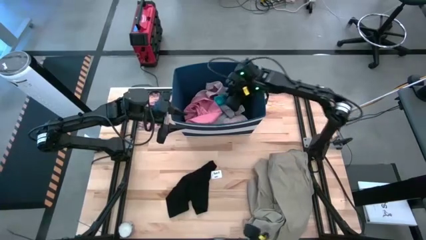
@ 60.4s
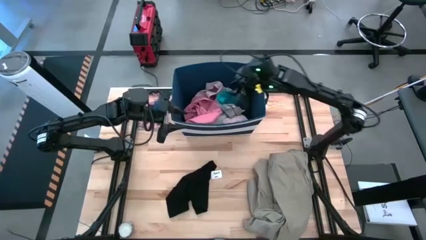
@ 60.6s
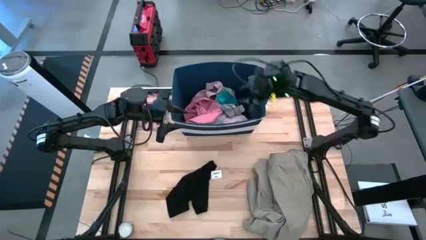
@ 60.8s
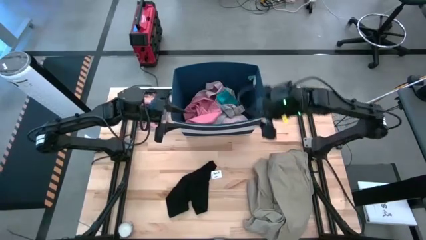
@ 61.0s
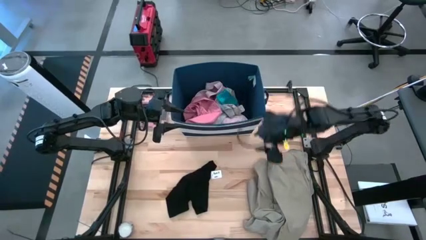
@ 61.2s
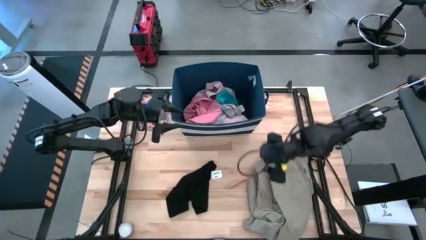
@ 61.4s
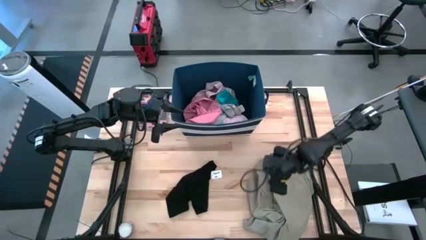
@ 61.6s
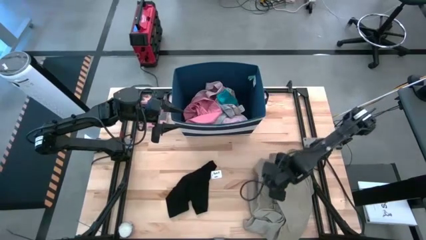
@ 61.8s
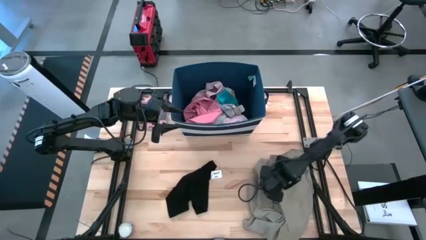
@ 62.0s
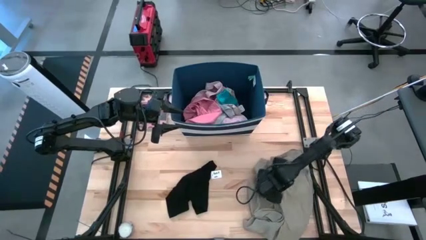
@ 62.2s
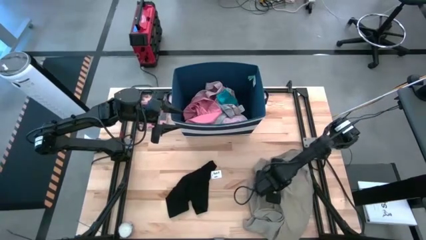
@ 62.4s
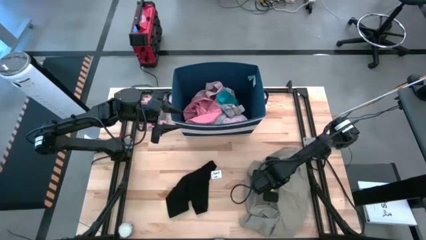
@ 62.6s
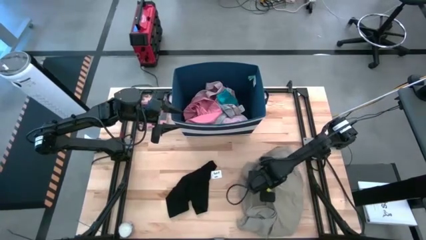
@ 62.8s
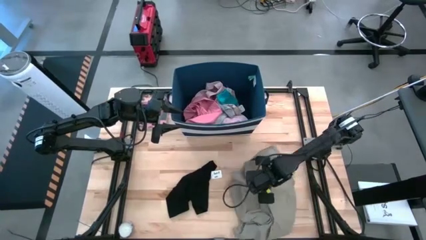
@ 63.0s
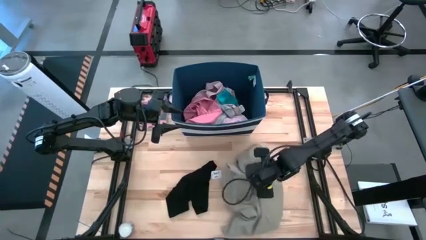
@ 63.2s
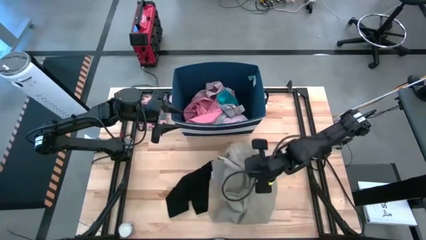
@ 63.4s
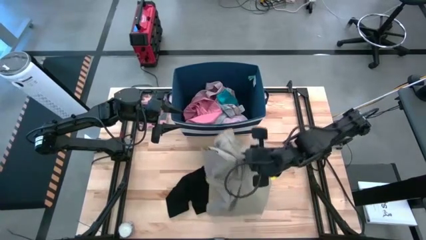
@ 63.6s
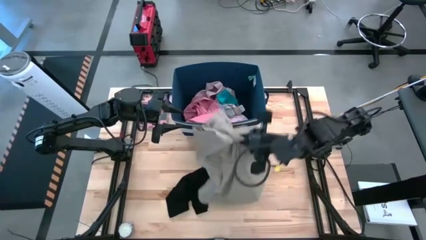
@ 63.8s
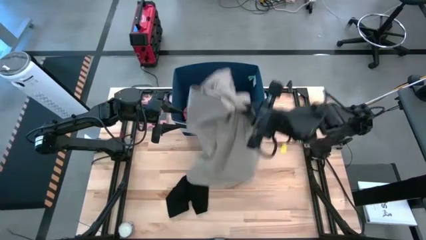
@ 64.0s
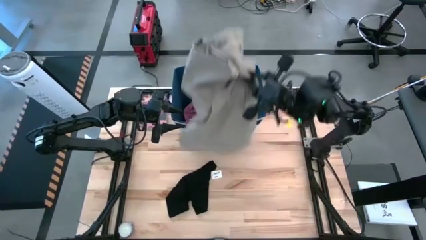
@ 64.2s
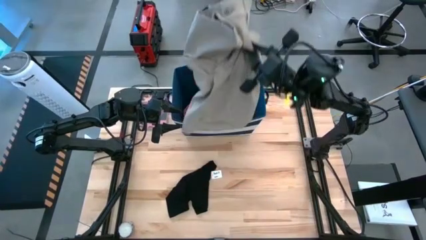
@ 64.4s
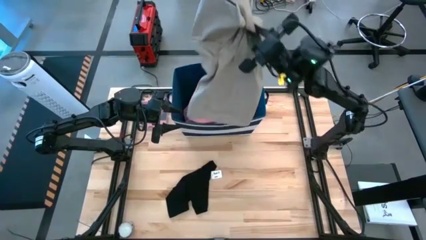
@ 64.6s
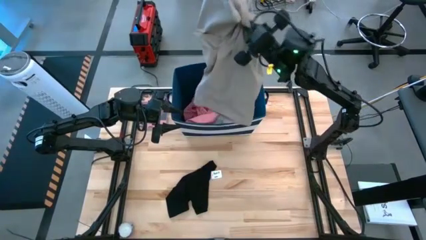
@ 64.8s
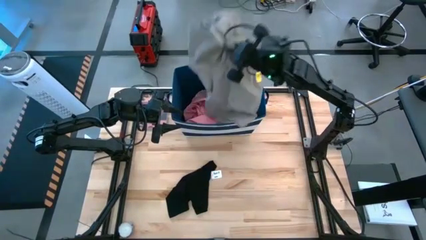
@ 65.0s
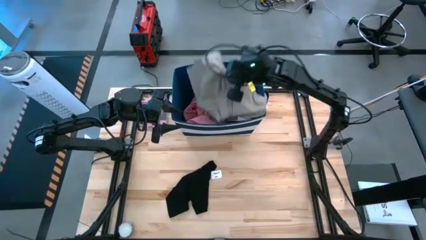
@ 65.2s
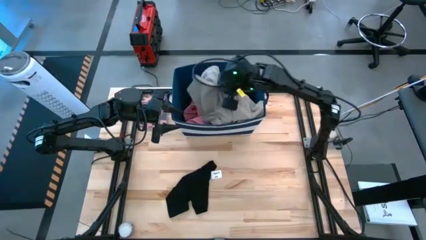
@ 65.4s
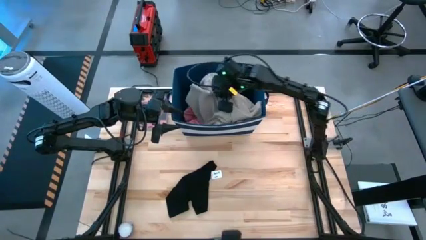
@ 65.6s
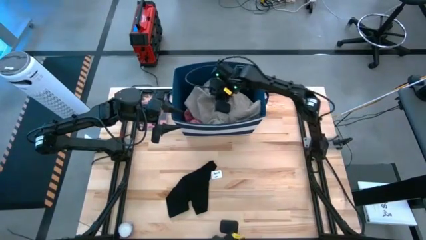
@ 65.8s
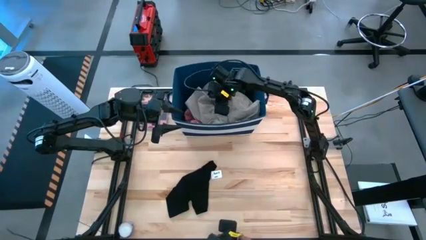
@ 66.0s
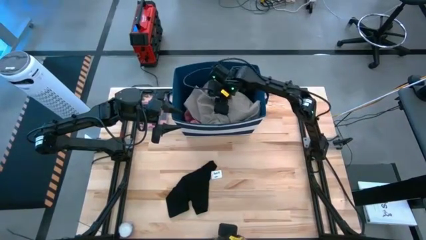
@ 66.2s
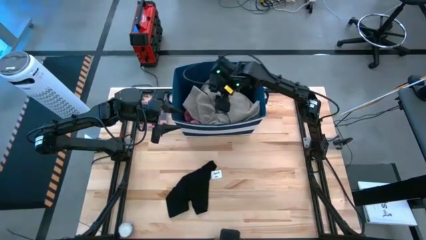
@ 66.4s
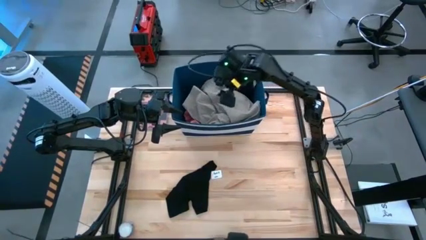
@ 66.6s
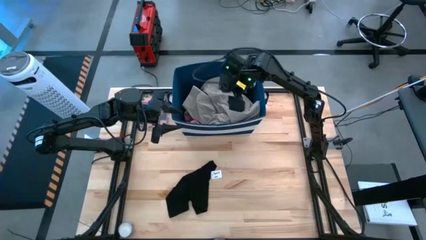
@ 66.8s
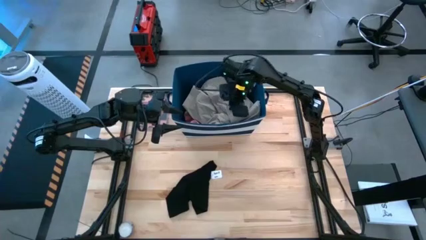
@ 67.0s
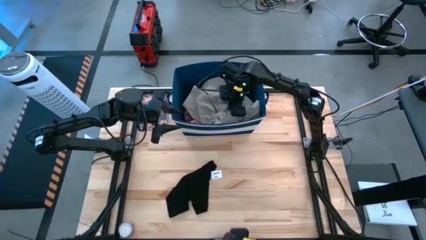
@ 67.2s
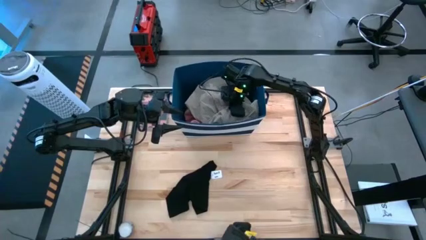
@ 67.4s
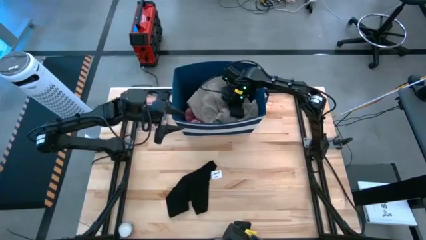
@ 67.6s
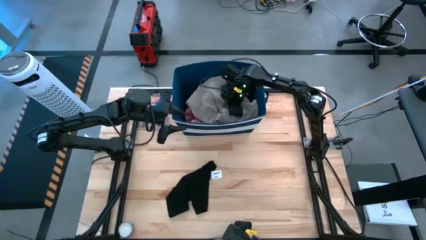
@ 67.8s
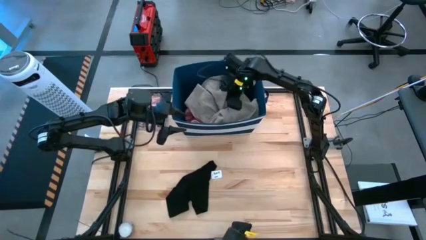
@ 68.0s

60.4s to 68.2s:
Task: Sort clothes
Put the gray shorts into the blue bin

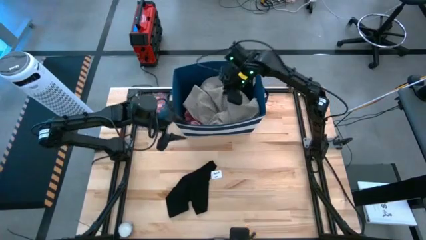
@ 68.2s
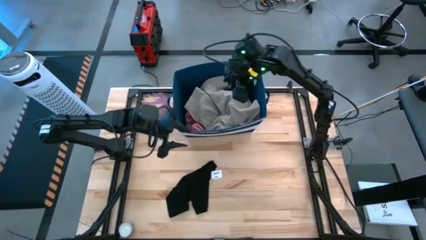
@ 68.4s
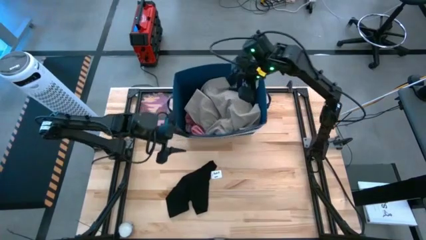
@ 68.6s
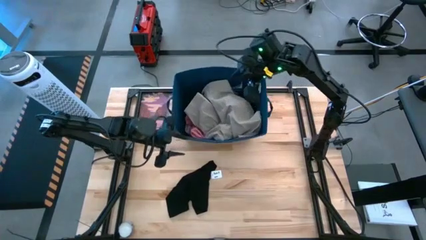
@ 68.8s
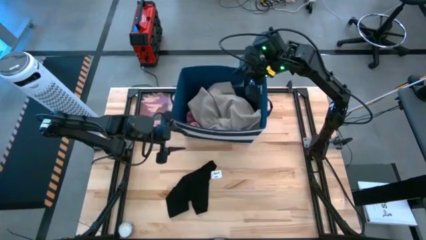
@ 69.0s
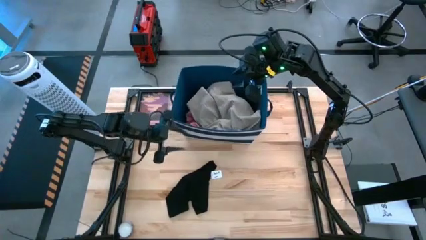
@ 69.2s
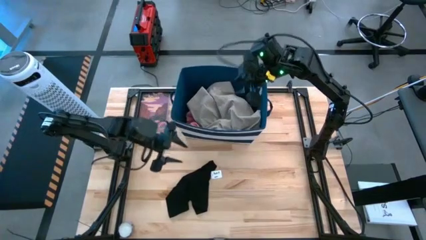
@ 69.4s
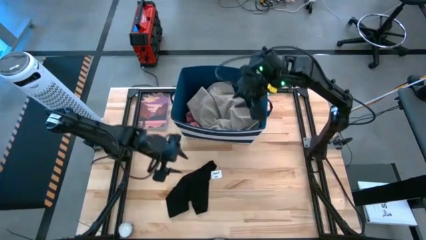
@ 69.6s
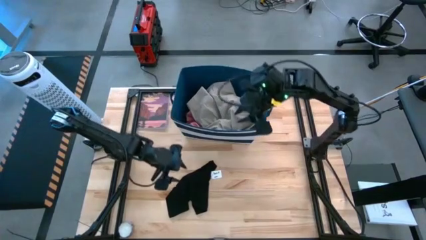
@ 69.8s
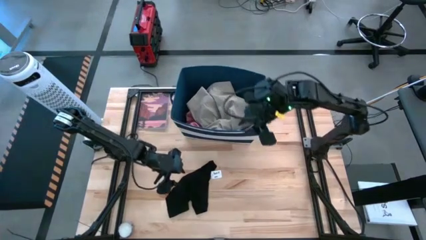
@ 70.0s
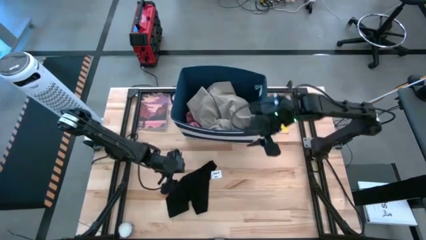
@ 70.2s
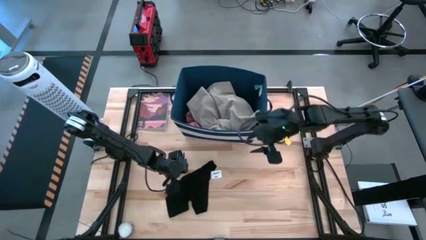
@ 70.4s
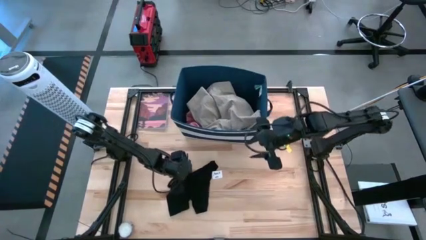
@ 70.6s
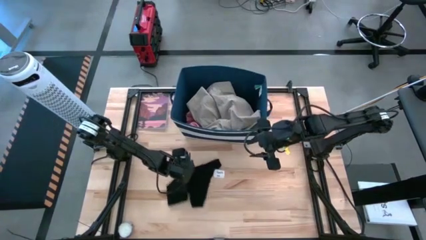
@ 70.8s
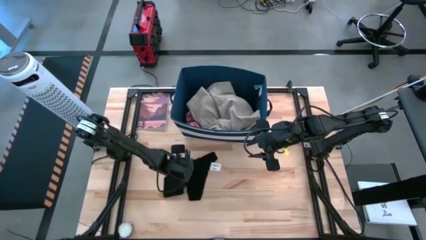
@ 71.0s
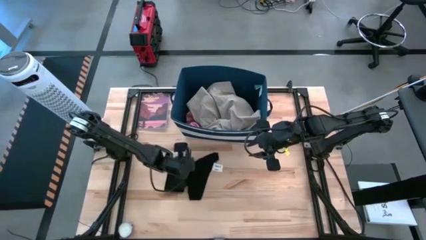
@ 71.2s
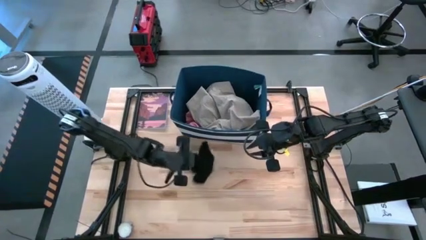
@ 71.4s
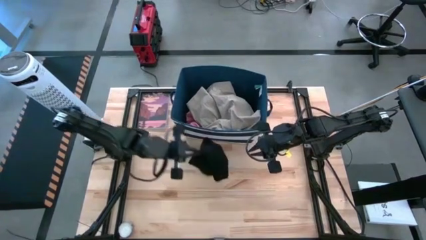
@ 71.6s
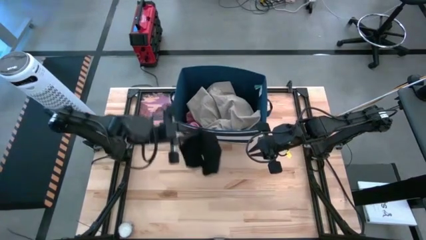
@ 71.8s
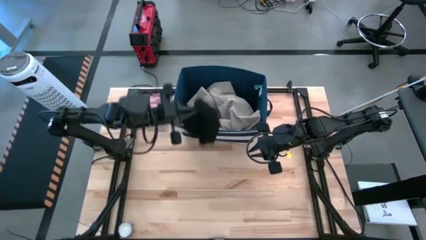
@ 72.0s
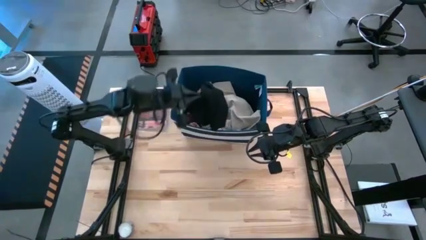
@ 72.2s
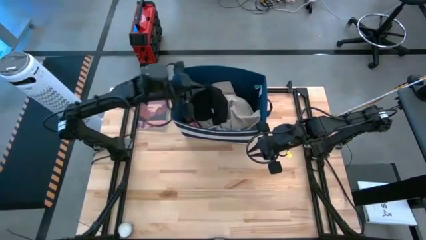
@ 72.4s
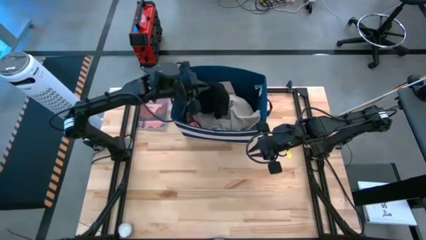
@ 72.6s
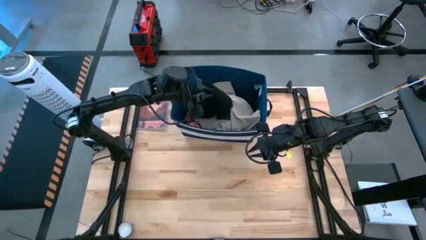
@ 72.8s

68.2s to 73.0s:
Put the black shorts into the blue bin

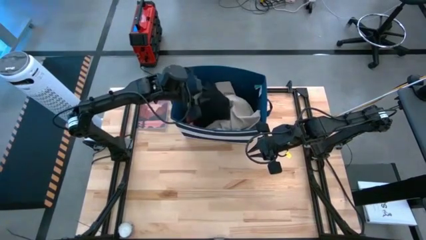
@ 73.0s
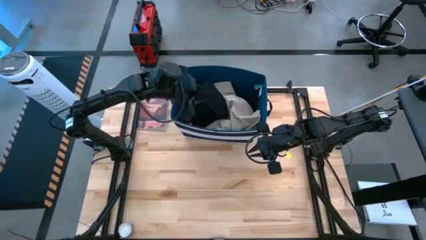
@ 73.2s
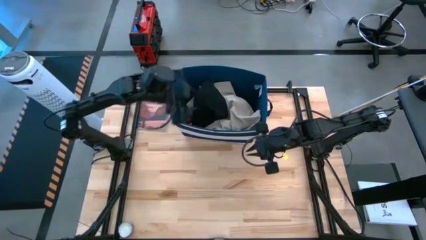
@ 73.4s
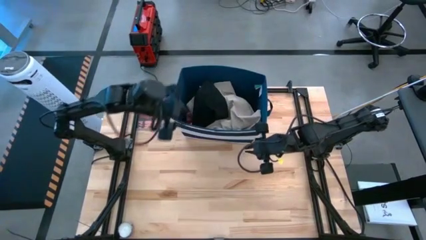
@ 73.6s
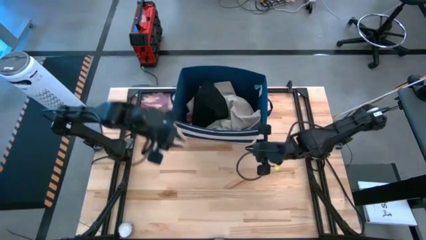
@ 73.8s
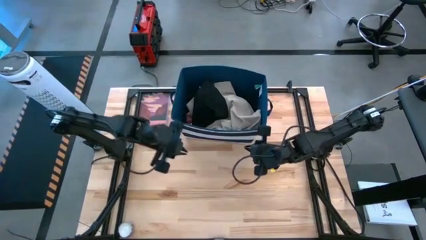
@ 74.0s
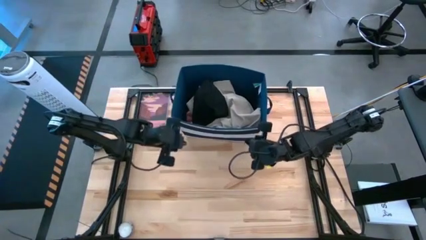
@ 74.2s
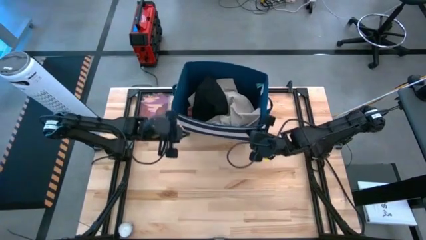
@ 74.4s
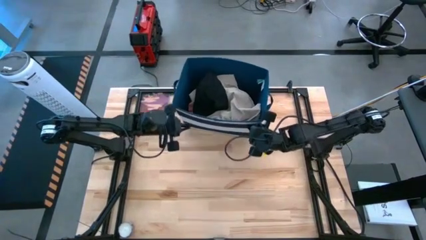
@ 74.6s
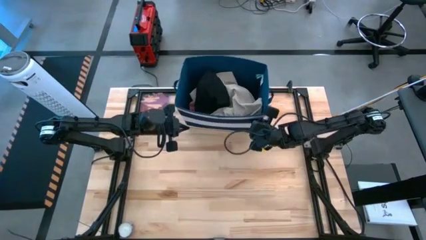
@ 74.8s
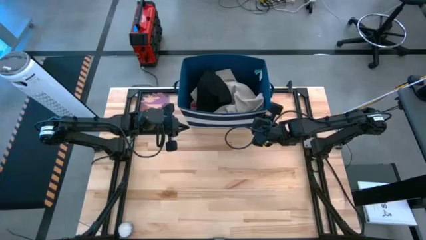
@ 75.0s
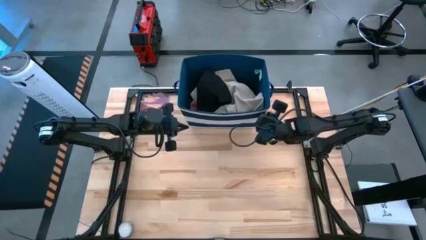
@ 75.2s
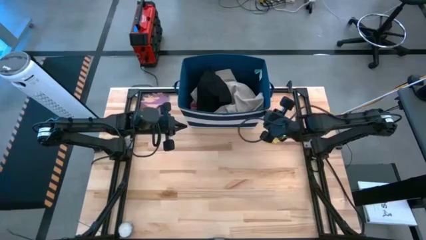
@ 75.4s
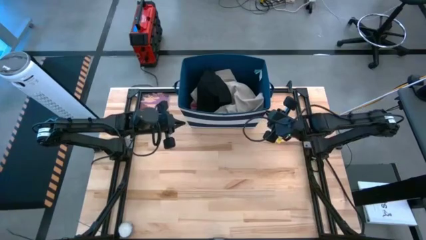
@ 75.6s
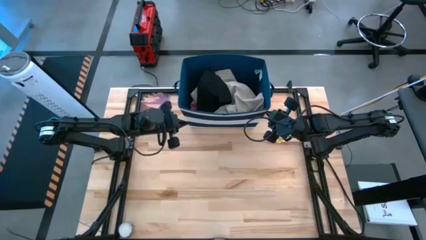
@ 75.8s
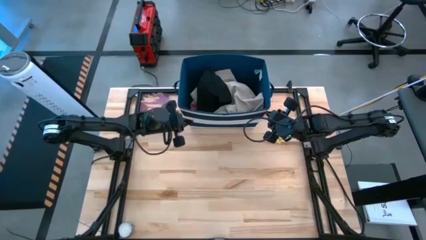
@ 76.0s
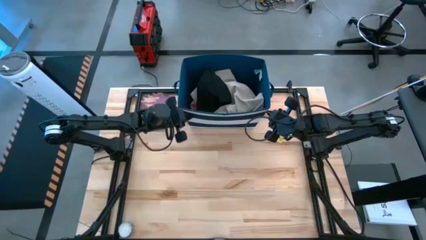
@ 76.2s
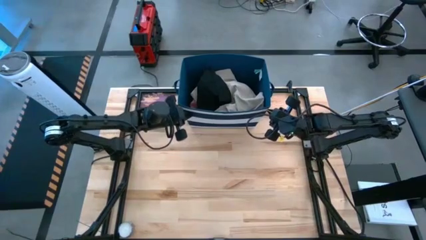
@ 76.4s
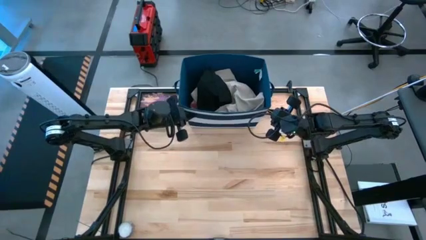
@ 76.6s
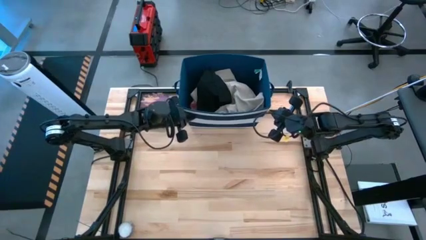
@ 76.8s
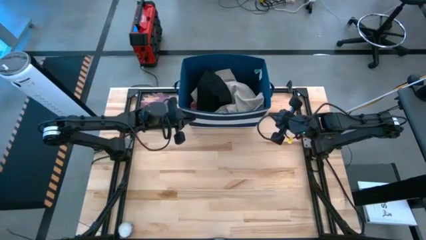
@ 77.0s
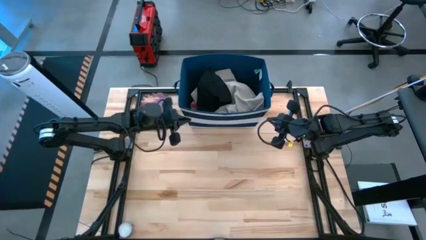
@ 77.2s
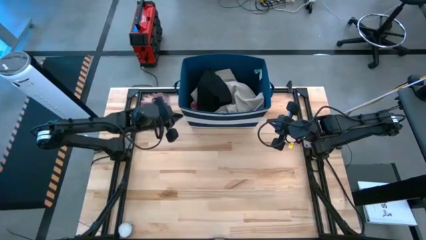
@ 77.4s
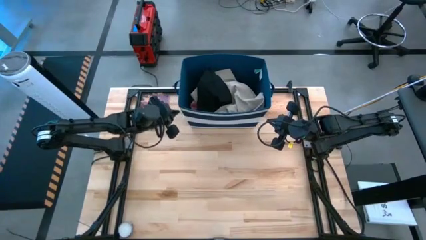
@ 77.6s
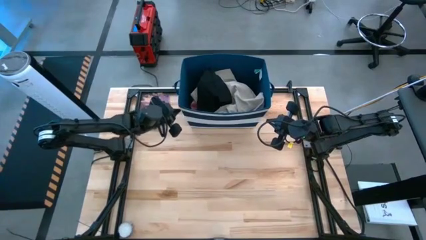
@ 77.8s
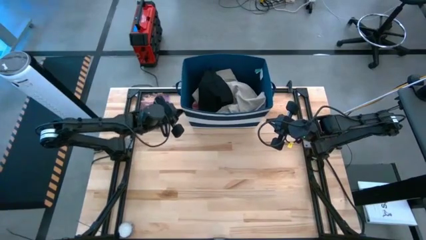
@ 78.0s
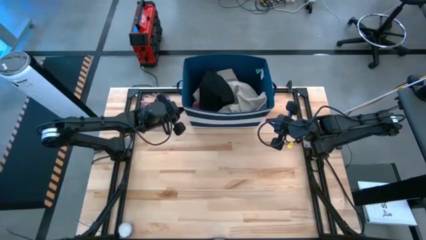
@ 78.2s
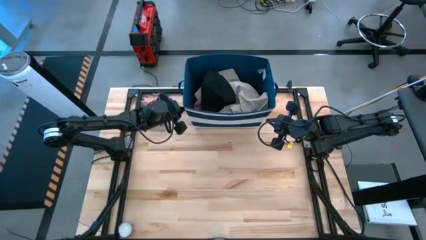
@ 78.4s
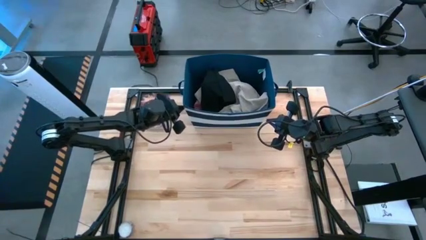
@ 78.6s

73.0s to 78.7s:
Adjust the blue bin on the table
